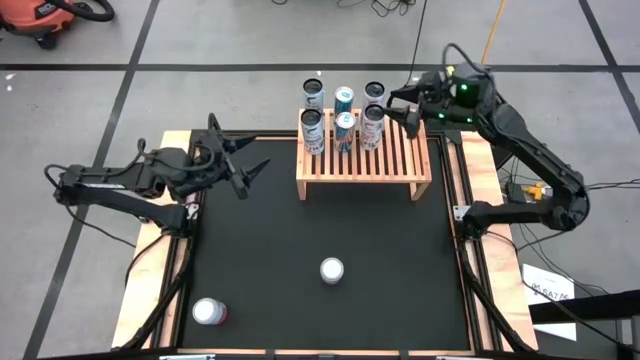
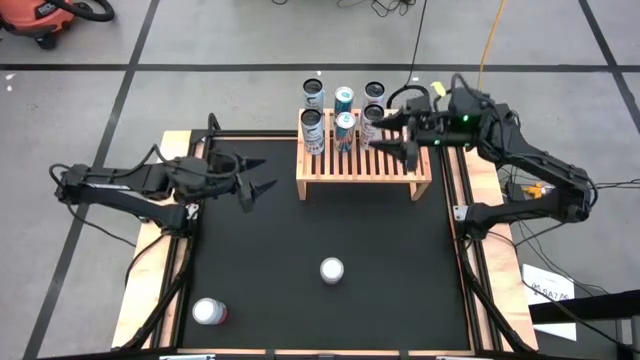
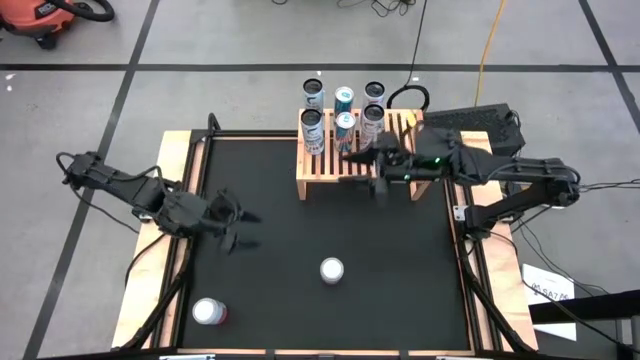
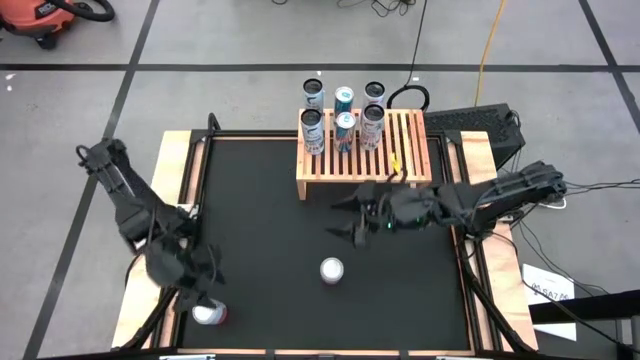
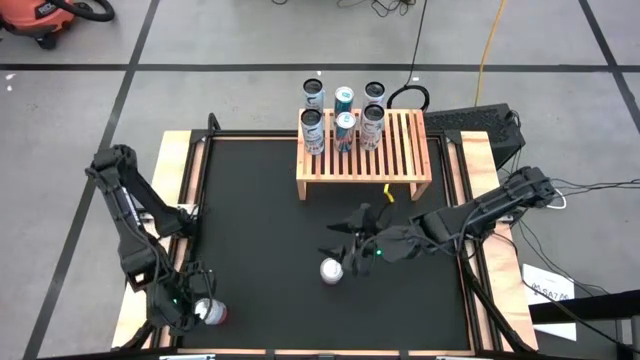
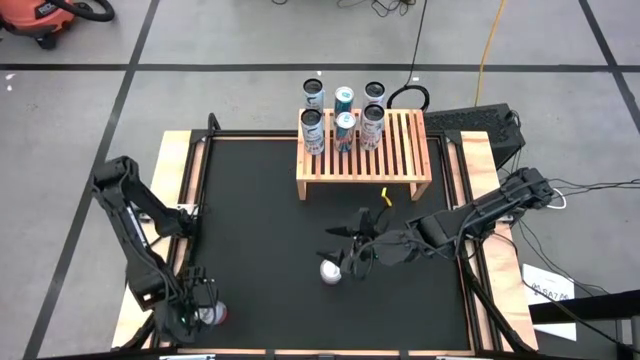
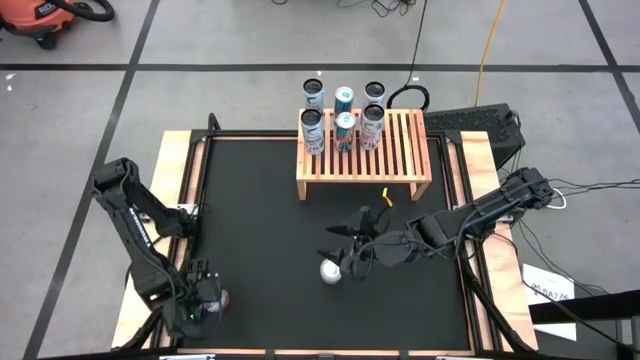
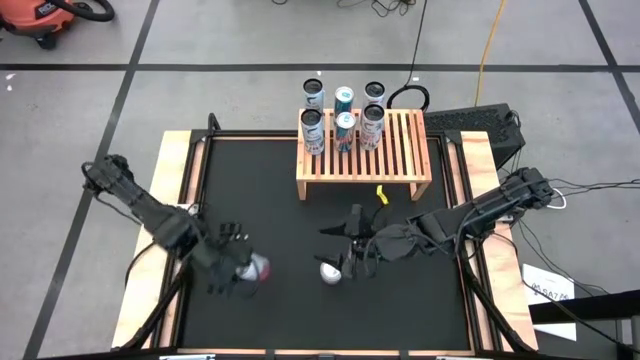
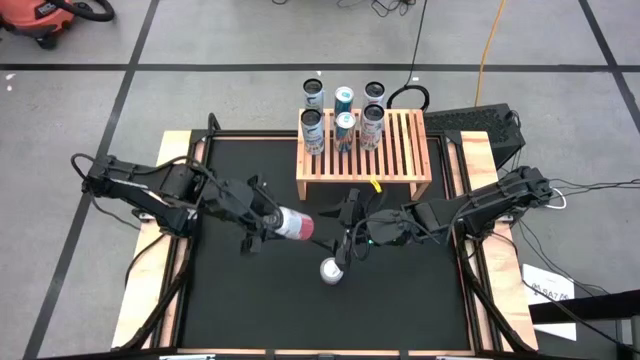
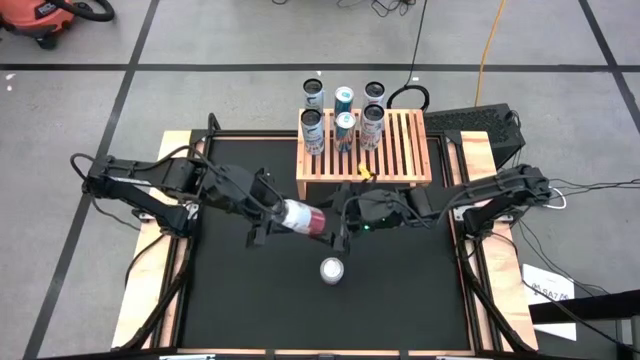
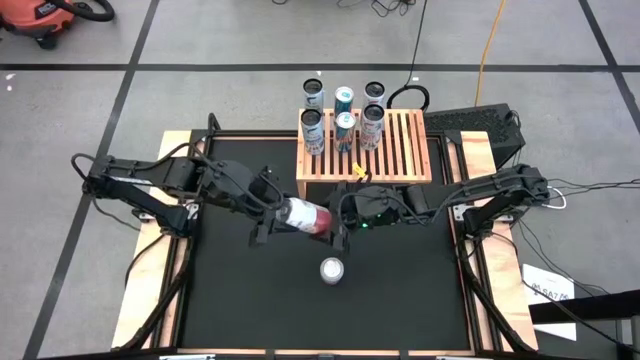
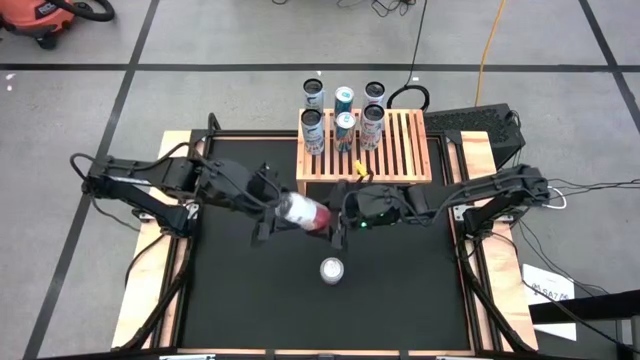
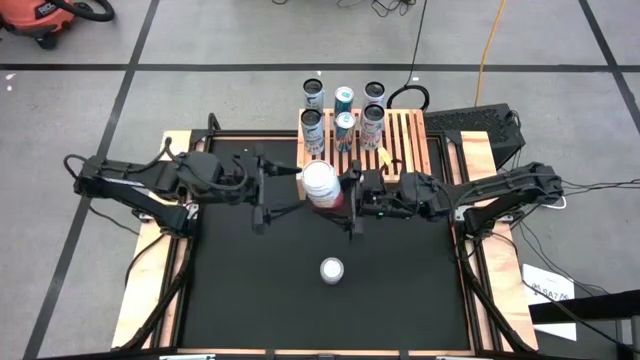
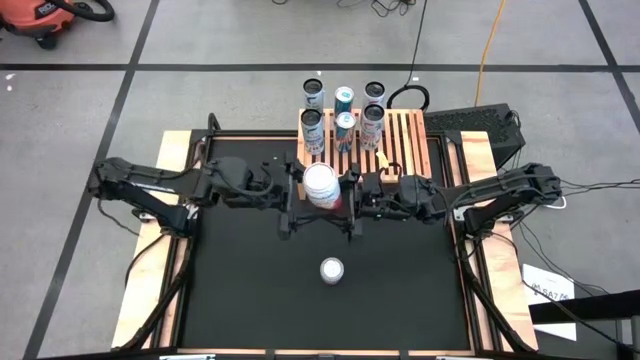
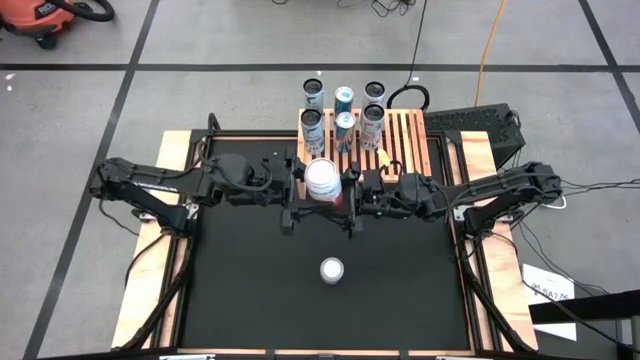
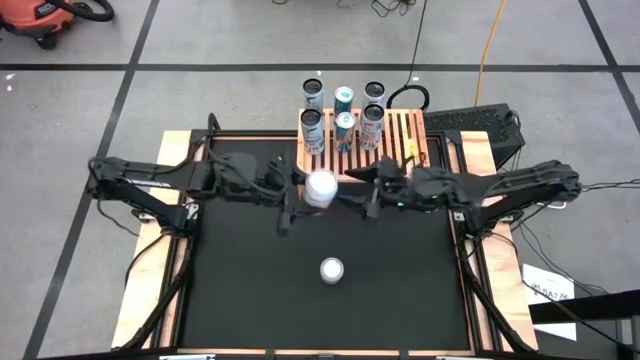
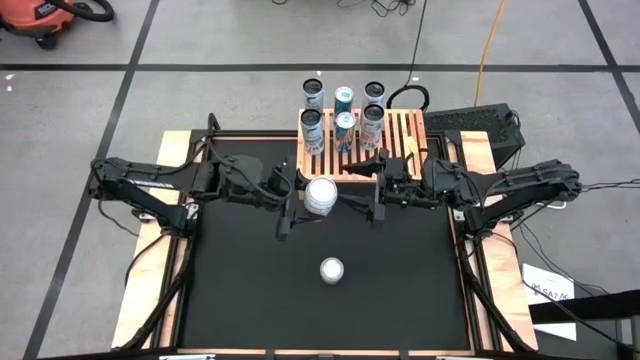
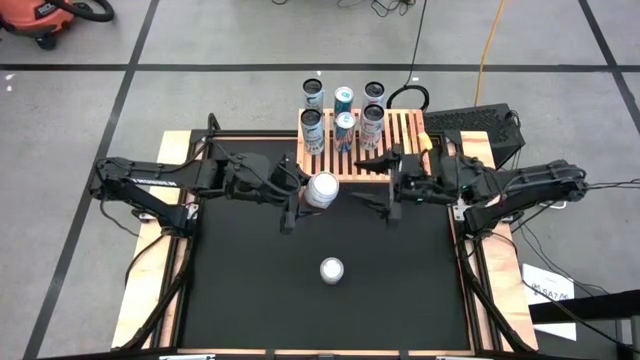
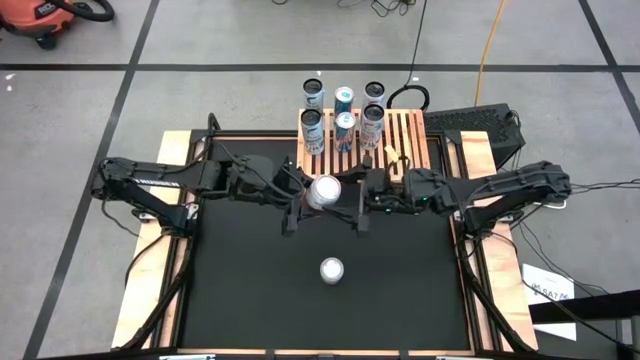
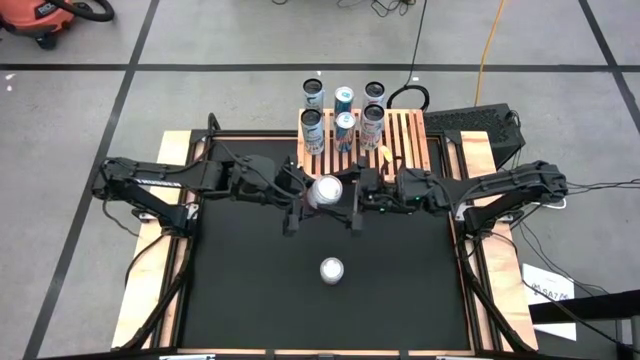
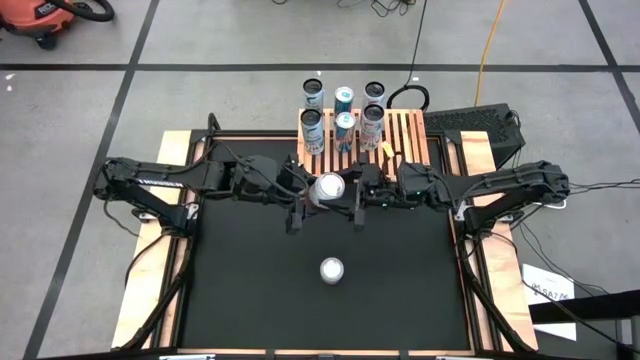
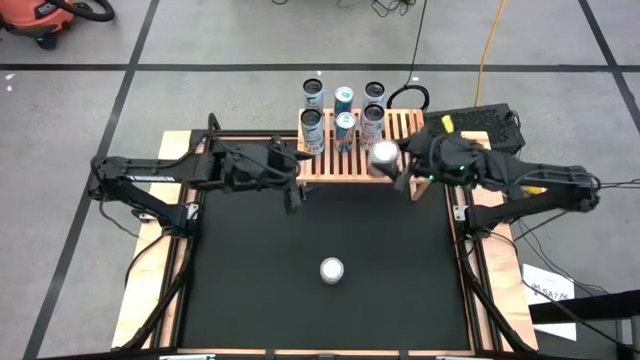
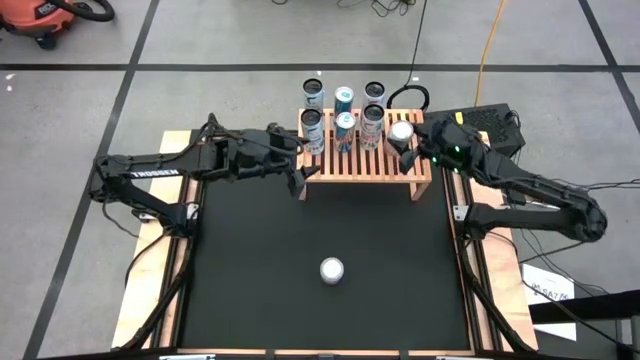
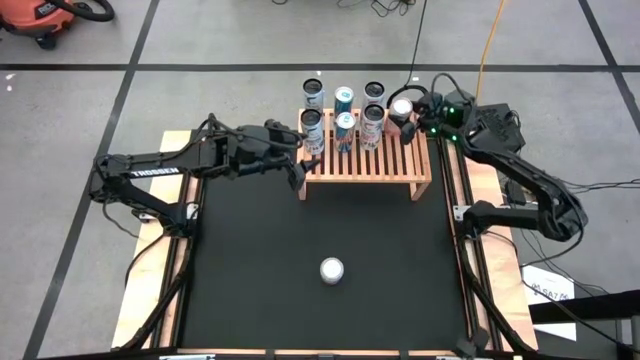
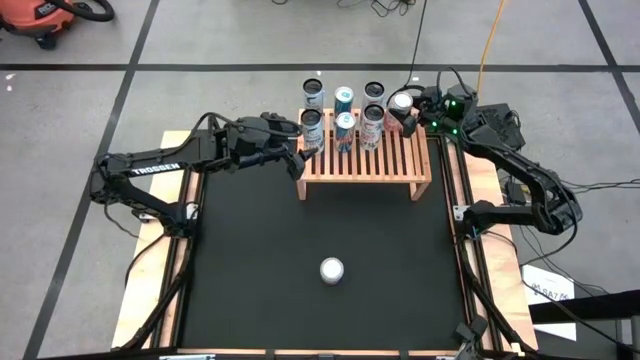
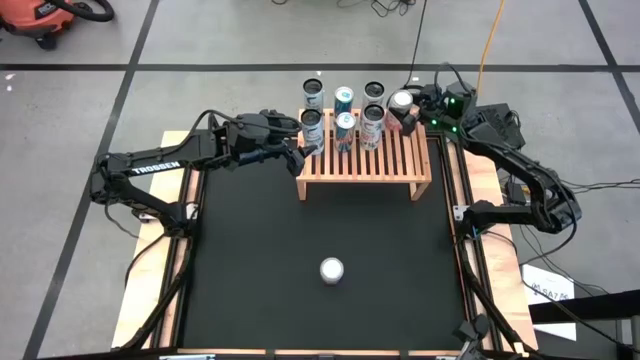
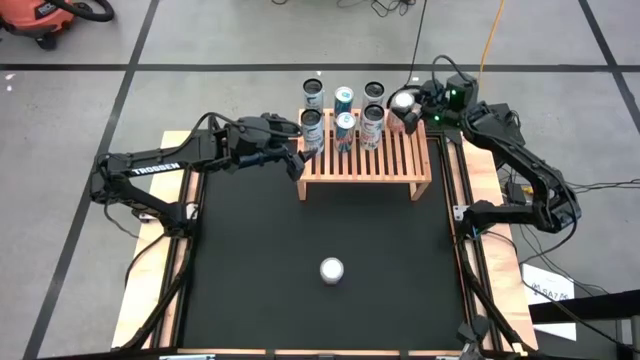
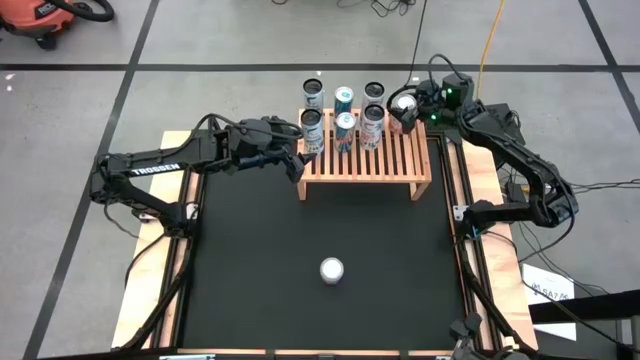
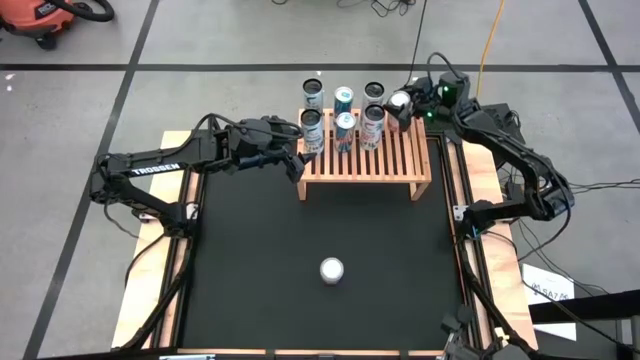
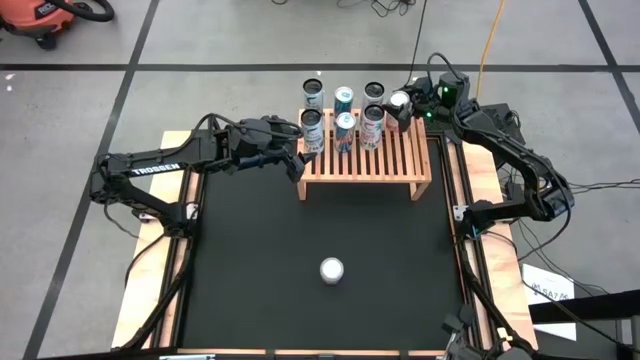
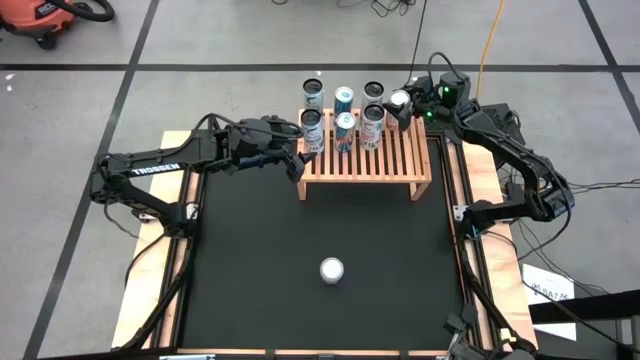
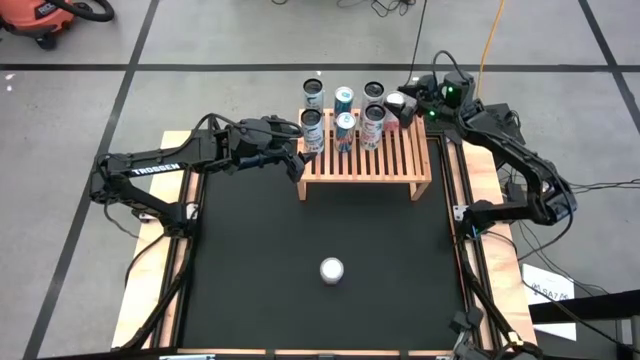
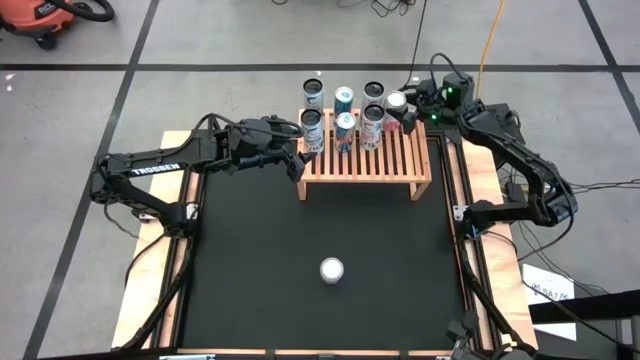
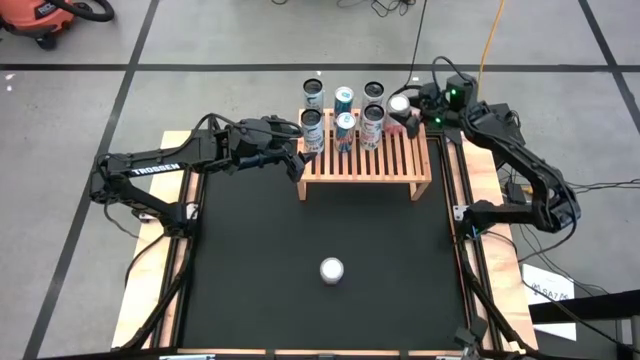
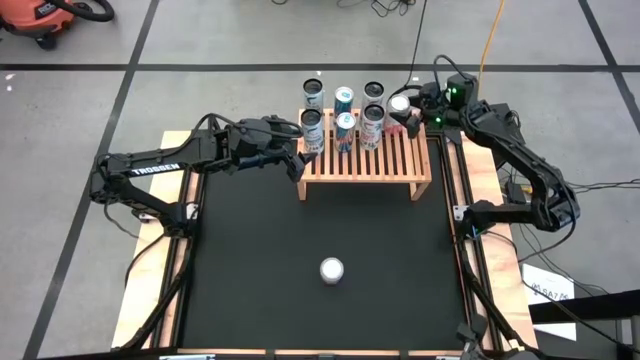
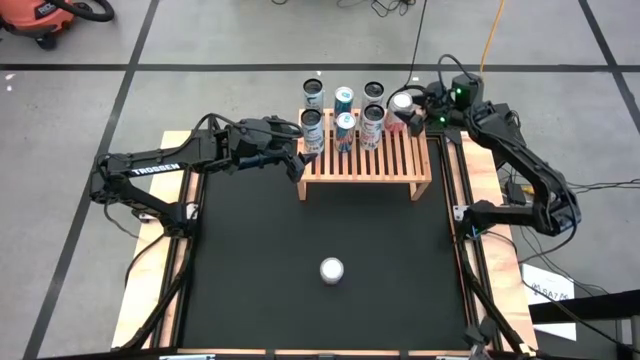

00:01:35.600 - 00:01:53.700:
Task: Place canned beverage on shelf
Put the white soda can on the shelf
